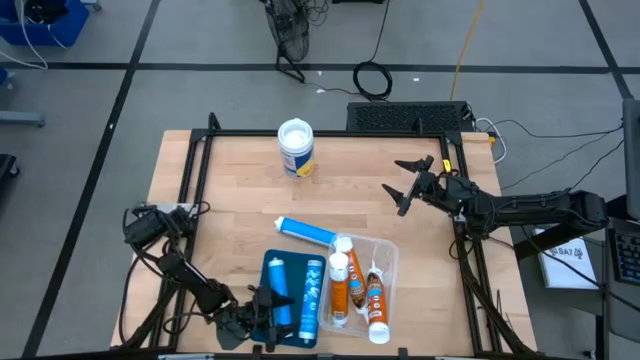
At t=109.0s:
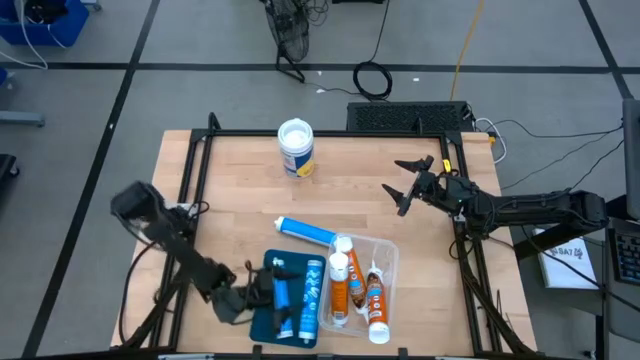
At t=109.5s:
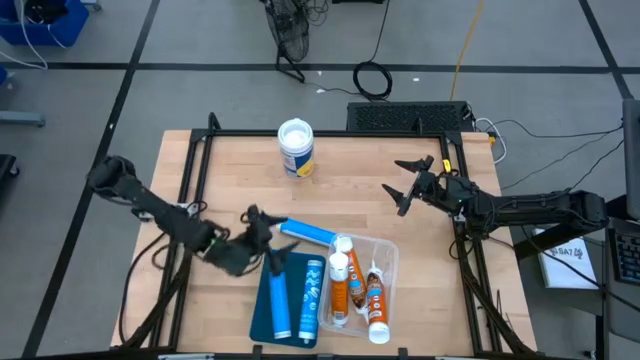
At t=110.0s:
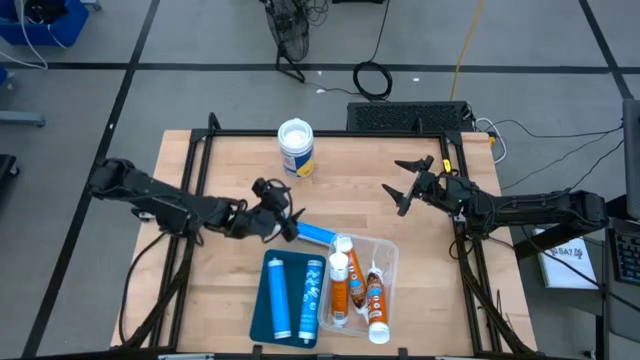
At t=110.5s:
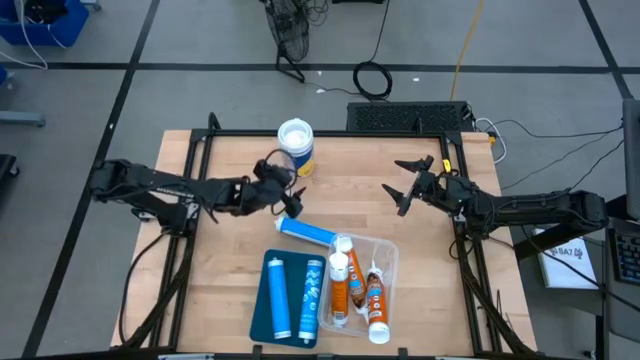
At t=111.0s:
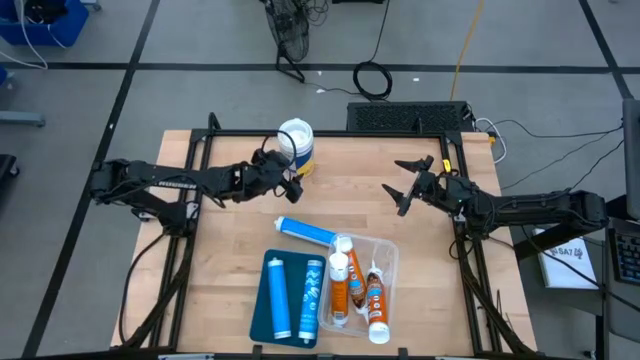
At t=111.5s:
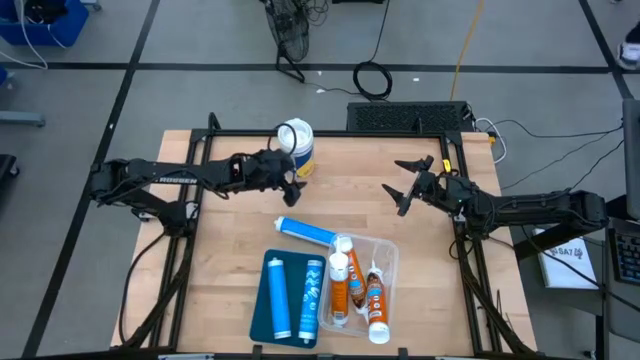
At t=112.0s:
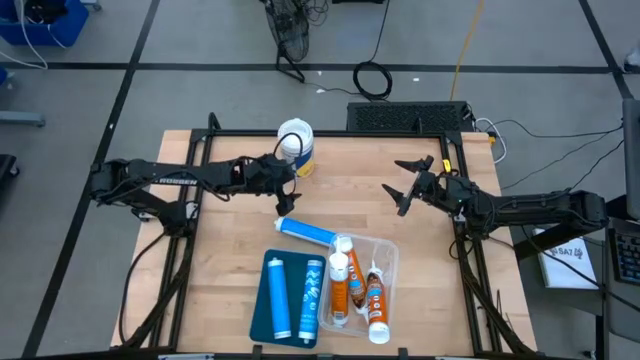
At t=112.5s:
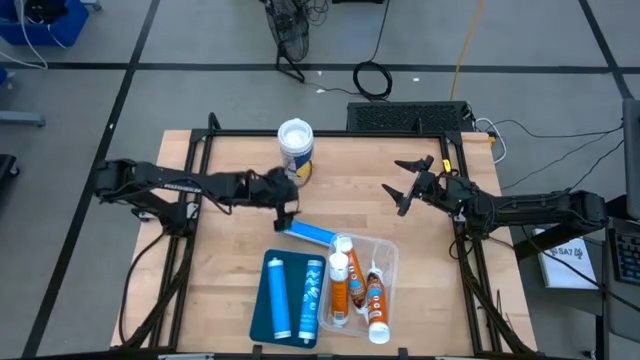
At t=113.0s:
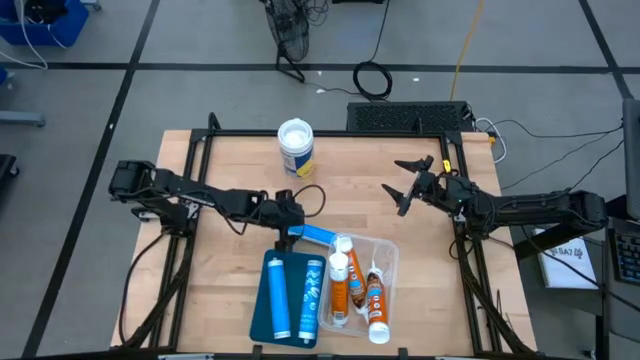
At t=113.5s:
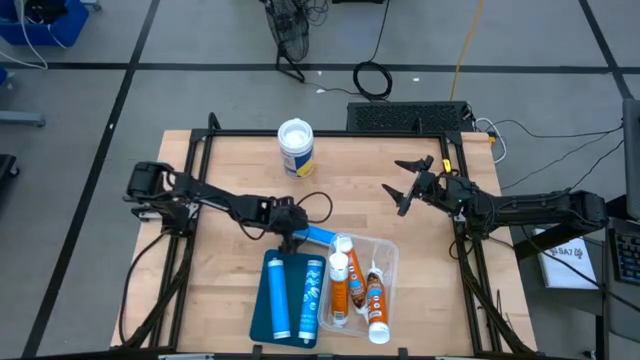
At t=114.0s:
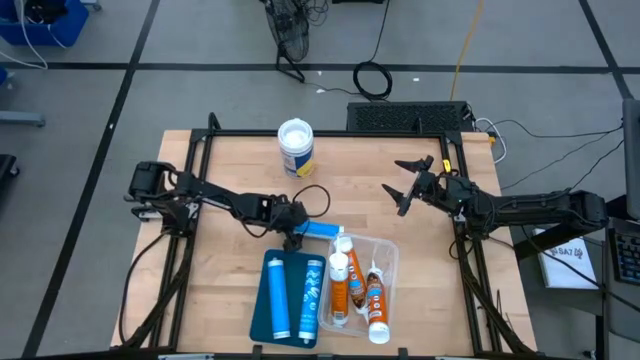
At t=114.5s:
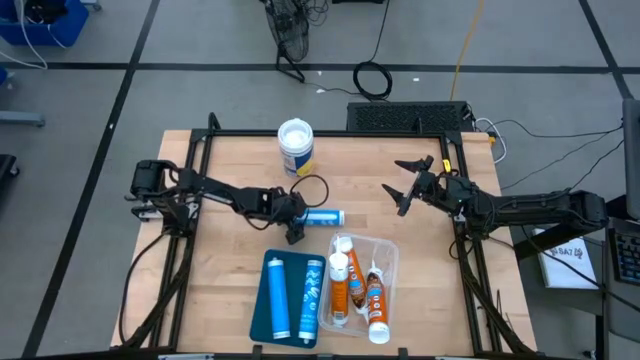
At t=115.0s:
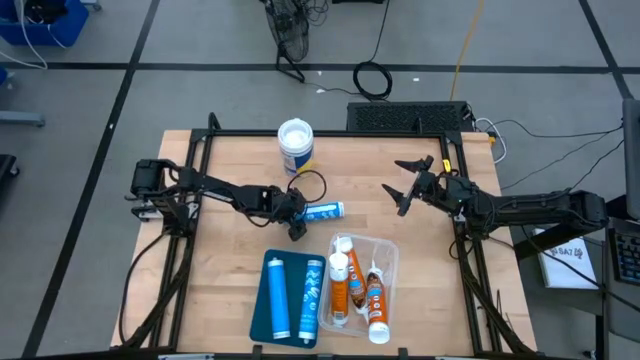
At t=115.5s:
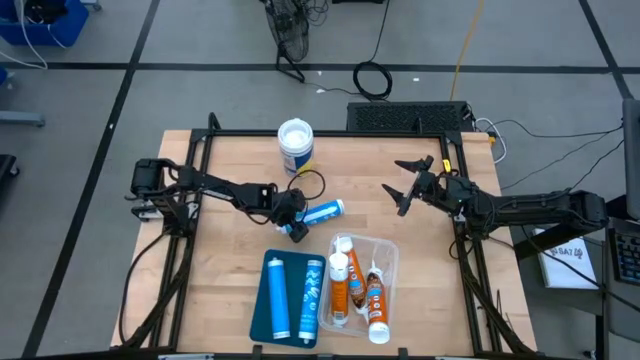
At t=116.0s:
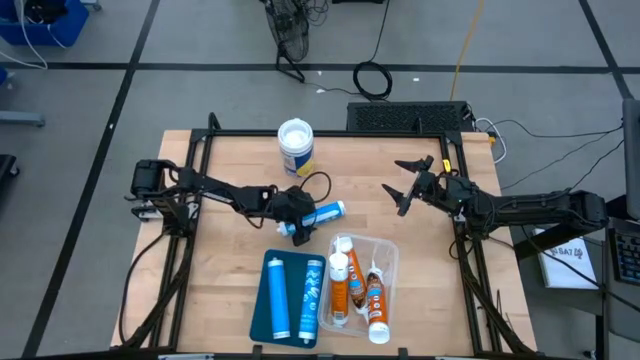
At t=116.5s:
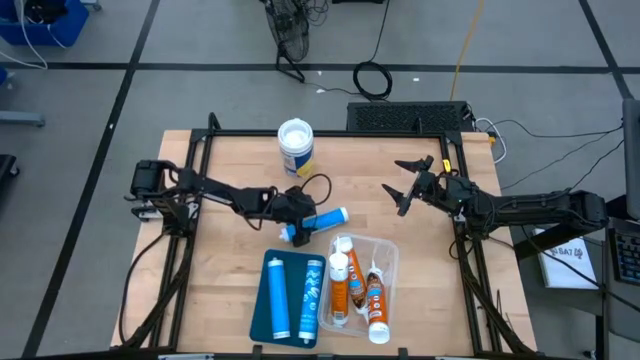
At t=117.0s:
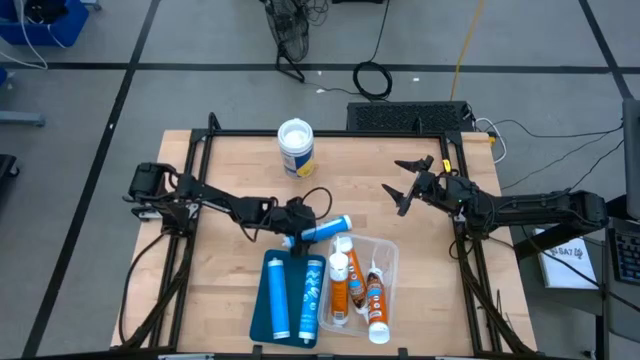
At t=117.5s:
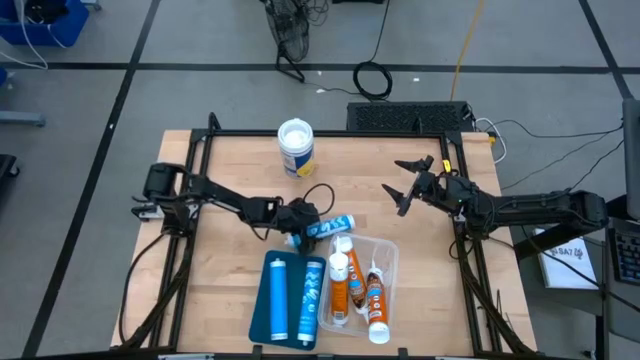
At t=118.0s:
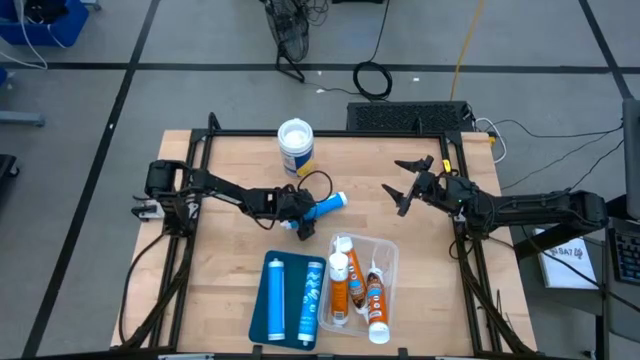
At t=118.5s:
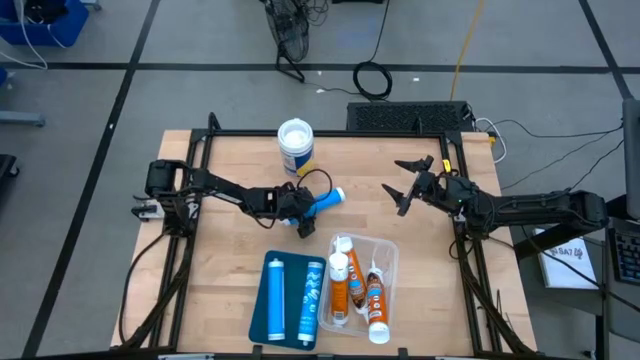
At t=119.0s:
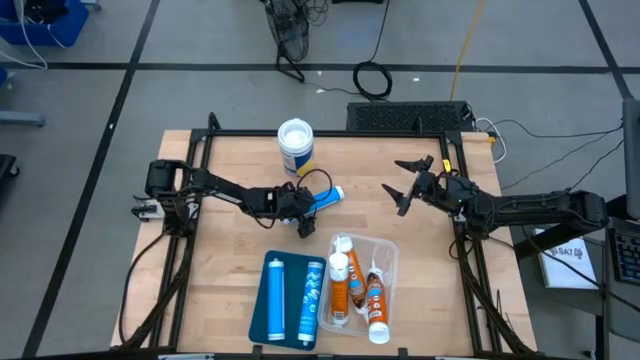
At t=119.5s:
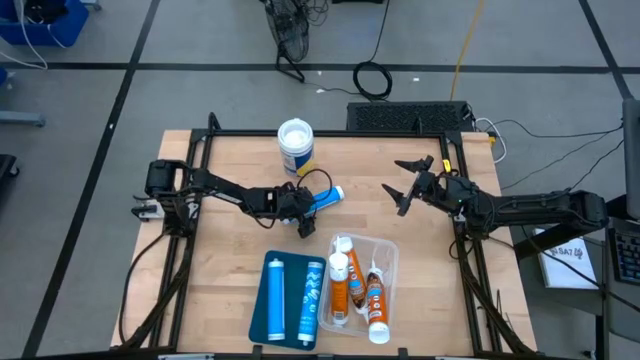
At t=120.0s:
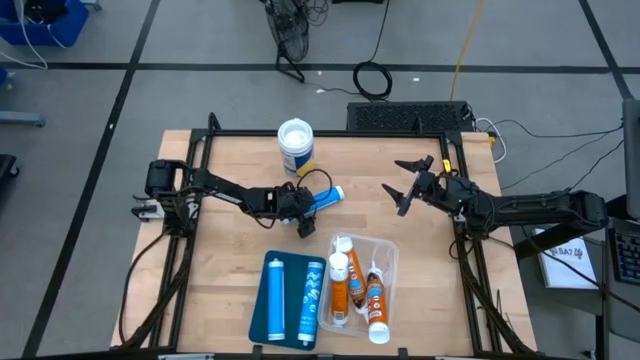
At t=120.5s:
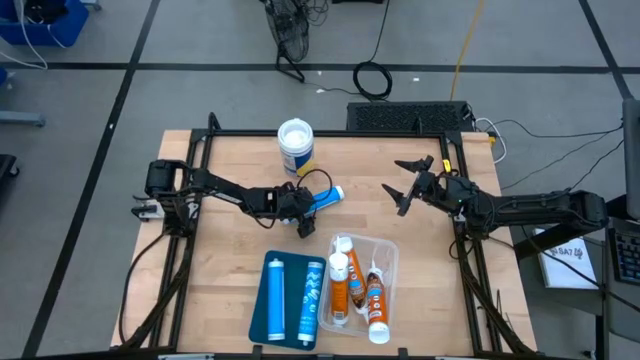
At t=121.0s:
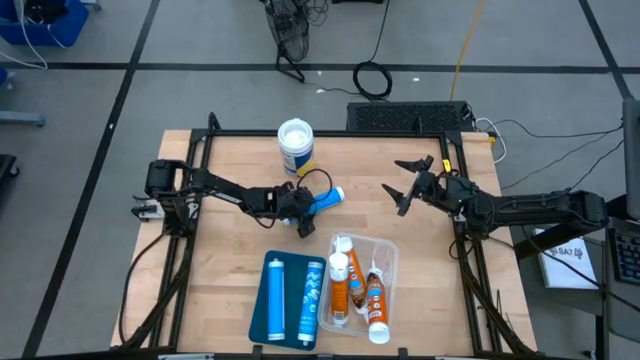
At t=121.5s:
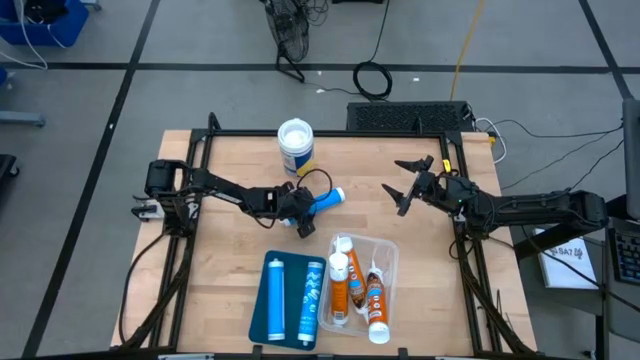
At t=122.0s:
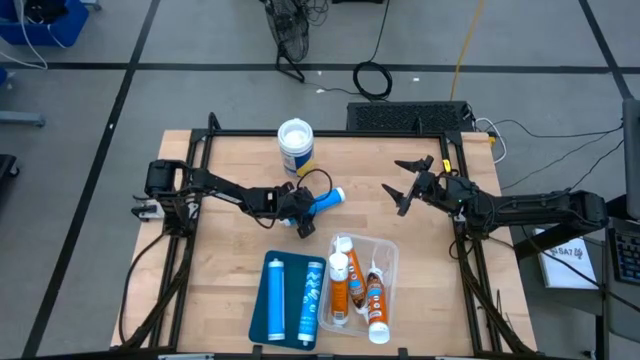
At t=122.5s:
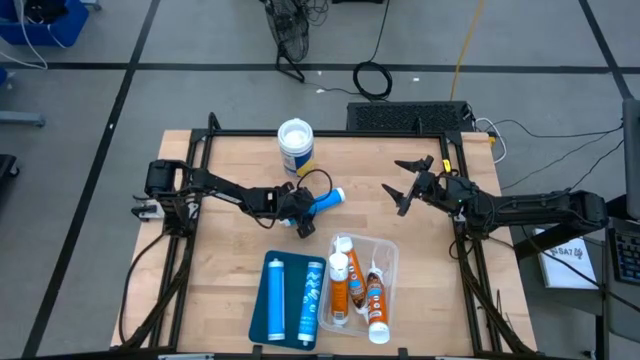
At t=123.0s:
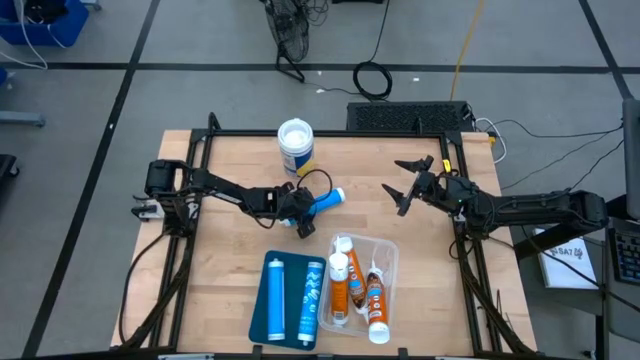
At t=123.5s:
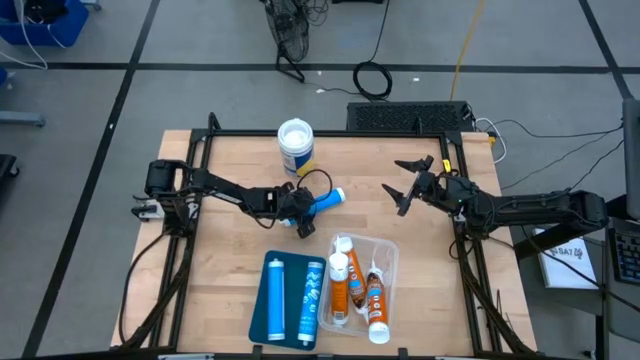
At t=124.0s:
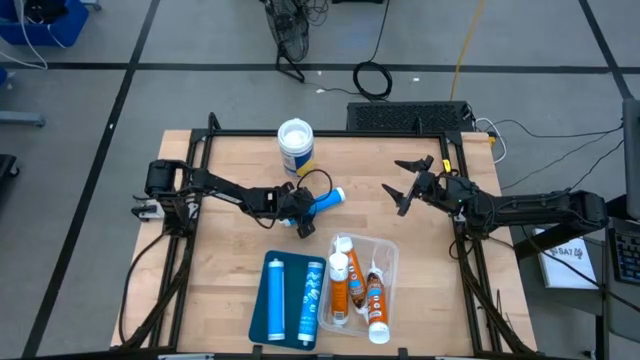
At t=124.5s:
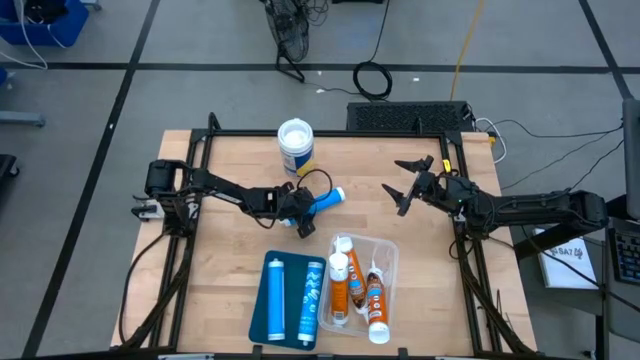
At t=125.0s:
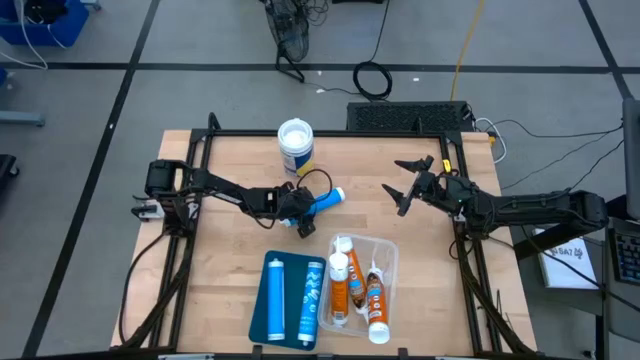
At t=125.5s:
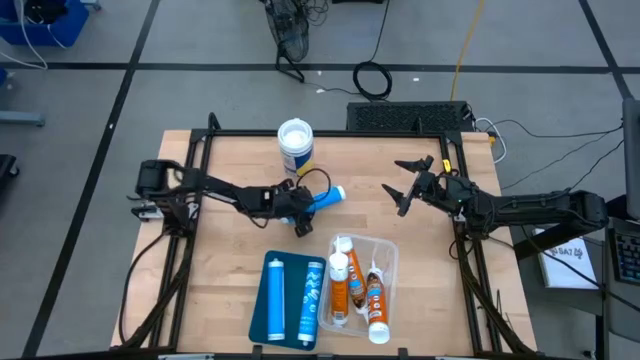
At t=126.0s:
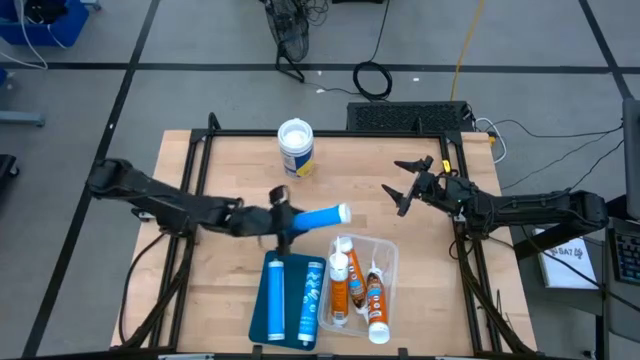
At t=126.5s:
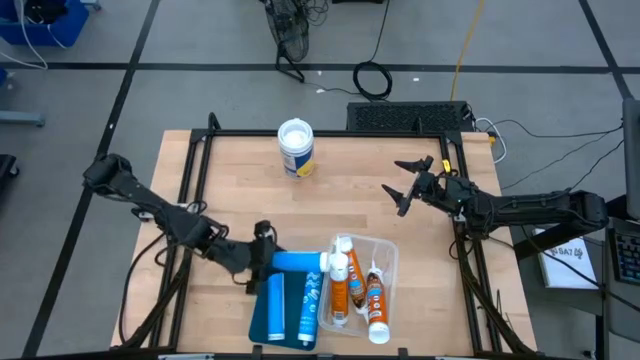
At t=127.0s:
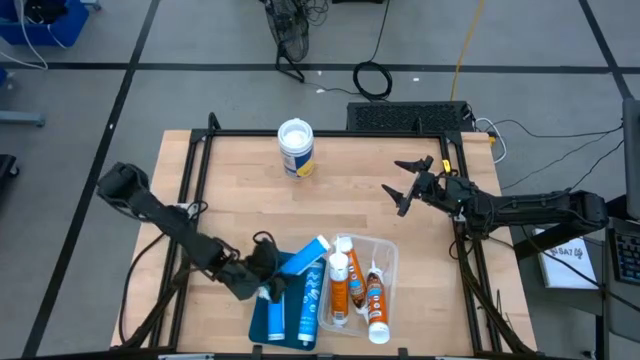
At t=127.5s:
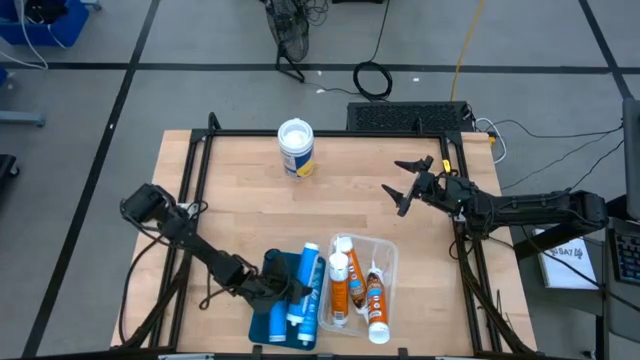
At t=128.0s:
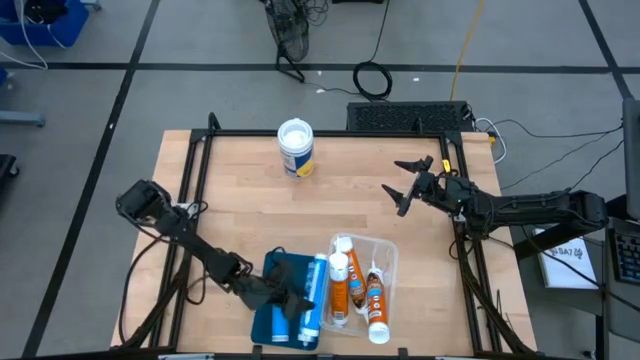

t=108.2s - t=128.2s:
Task: Pick & place silicon tubes, Sealant and Lysol wipes
Put the blue sealant into the blue bin
